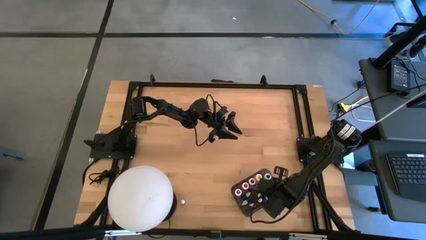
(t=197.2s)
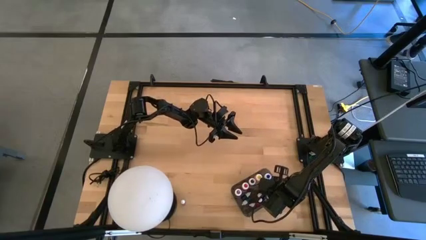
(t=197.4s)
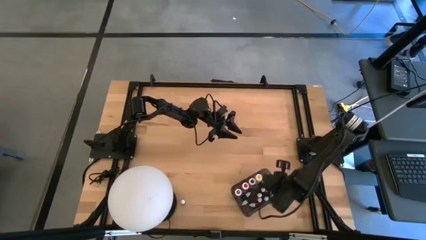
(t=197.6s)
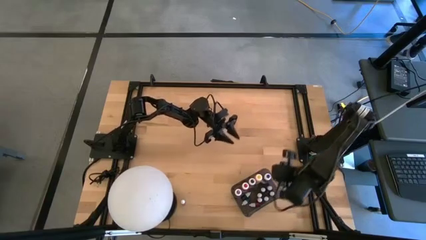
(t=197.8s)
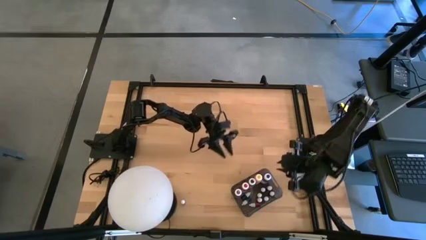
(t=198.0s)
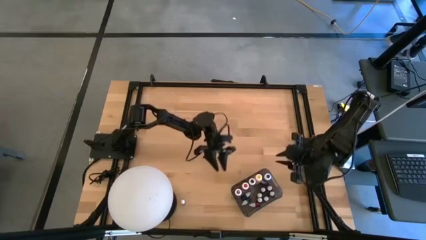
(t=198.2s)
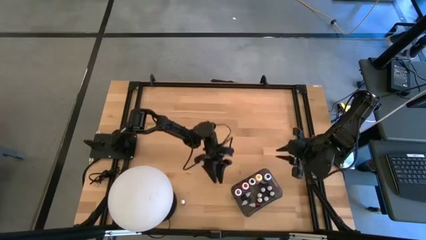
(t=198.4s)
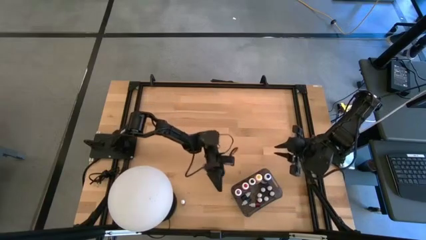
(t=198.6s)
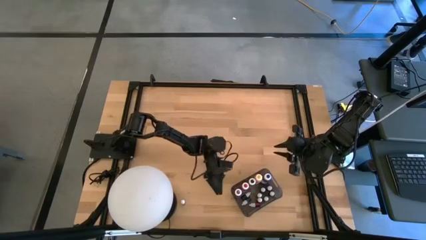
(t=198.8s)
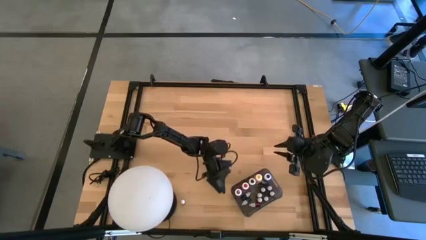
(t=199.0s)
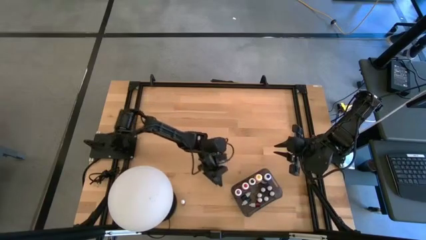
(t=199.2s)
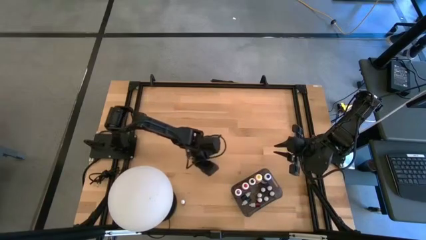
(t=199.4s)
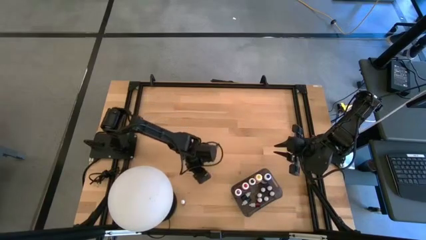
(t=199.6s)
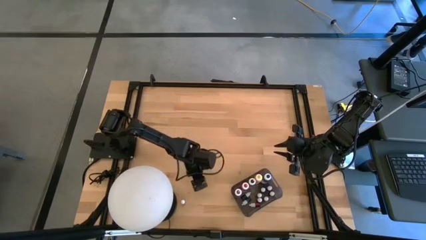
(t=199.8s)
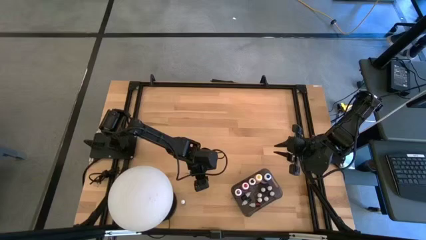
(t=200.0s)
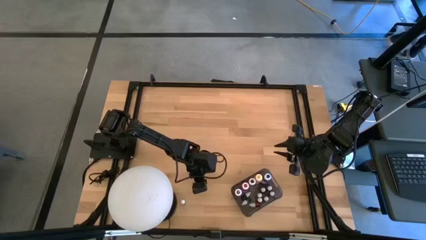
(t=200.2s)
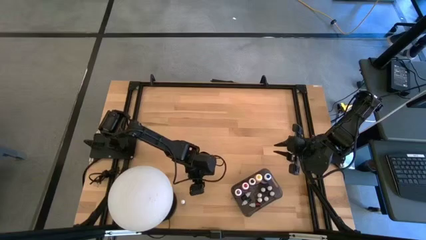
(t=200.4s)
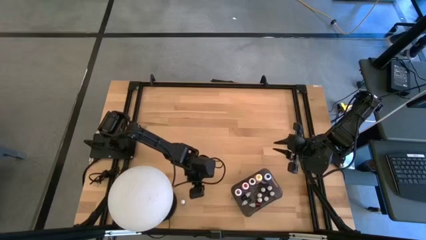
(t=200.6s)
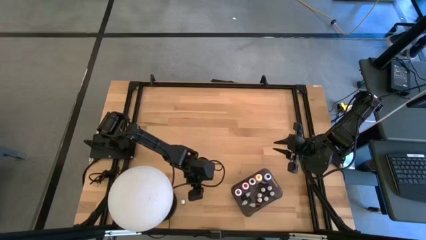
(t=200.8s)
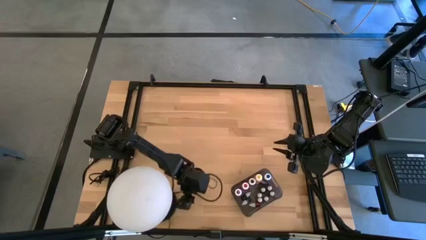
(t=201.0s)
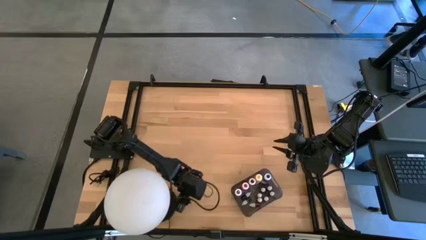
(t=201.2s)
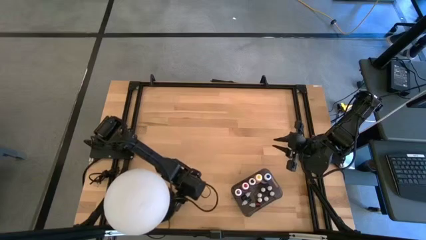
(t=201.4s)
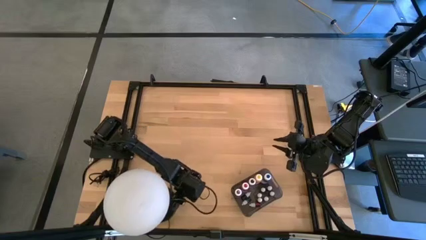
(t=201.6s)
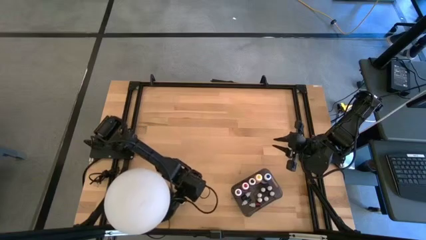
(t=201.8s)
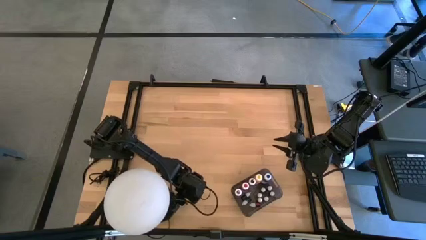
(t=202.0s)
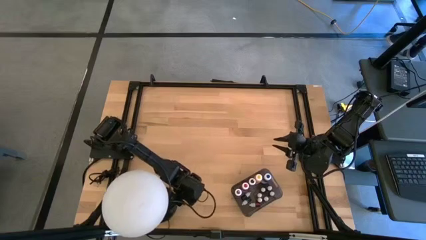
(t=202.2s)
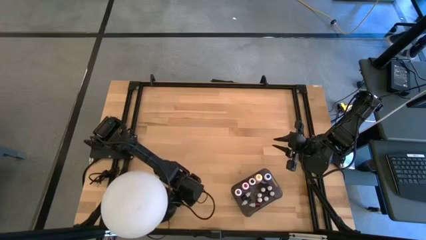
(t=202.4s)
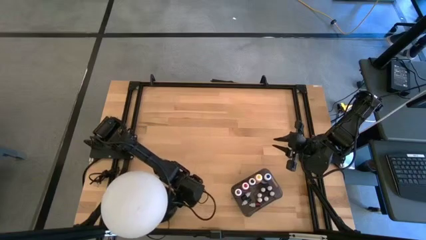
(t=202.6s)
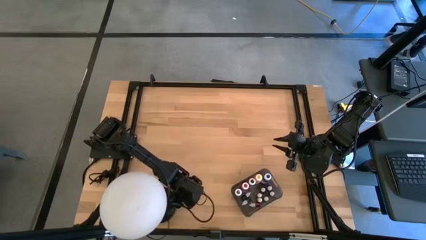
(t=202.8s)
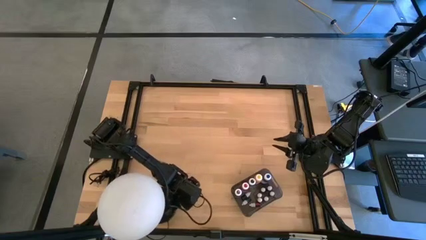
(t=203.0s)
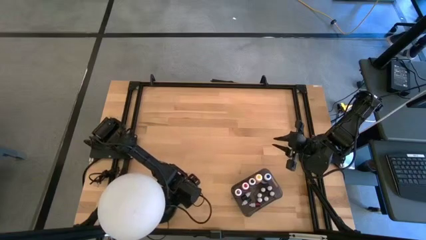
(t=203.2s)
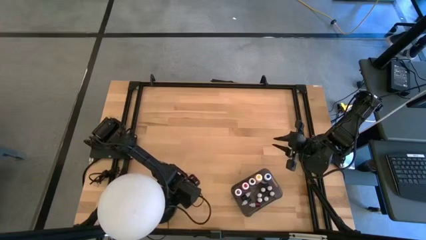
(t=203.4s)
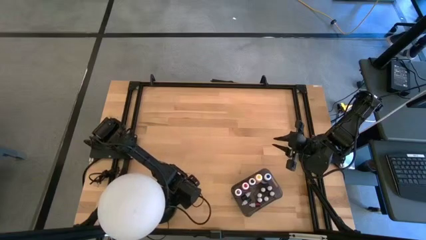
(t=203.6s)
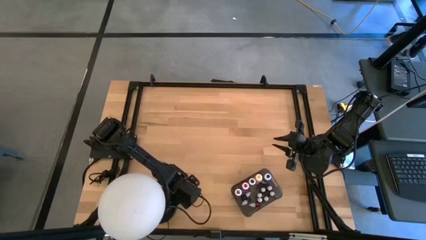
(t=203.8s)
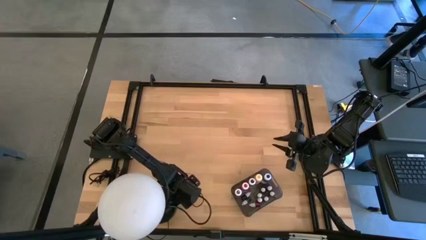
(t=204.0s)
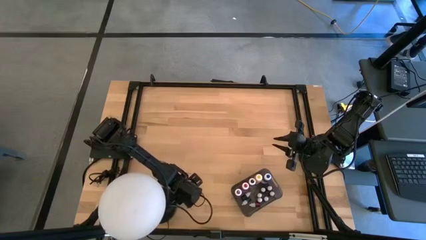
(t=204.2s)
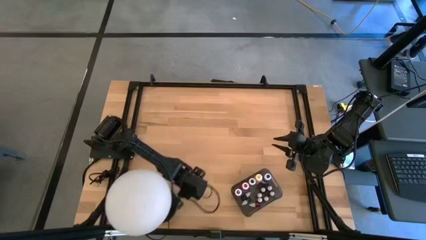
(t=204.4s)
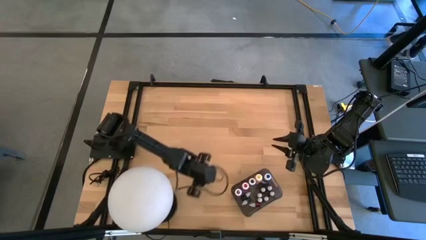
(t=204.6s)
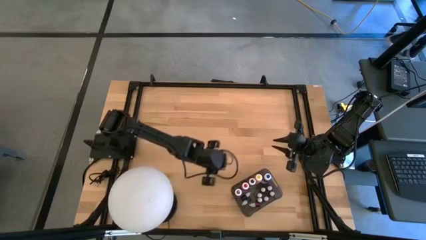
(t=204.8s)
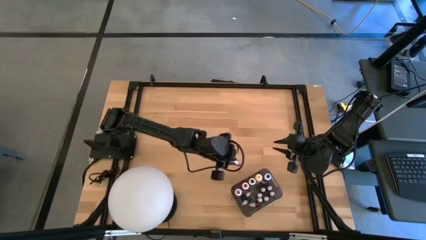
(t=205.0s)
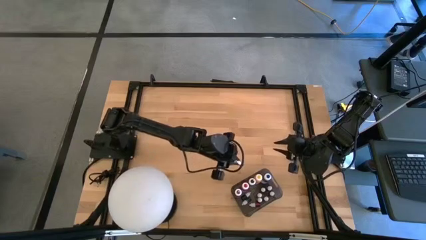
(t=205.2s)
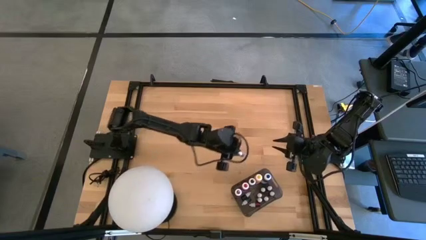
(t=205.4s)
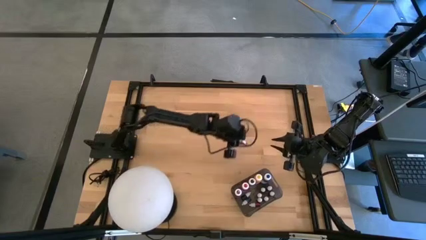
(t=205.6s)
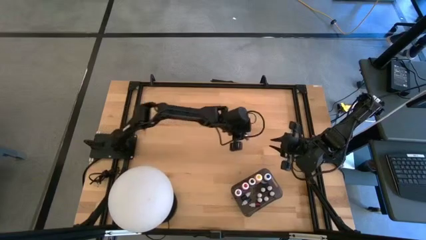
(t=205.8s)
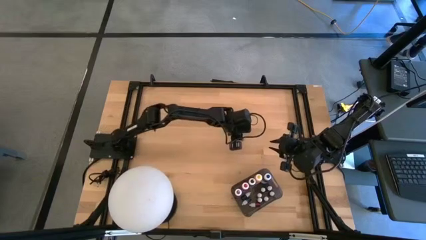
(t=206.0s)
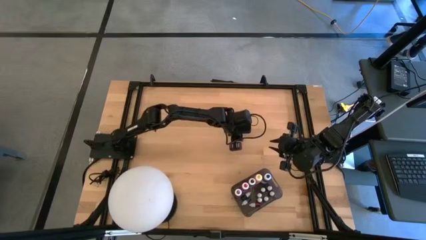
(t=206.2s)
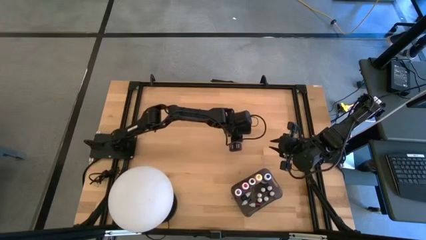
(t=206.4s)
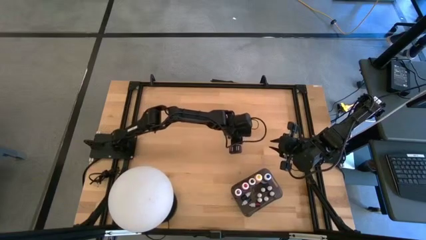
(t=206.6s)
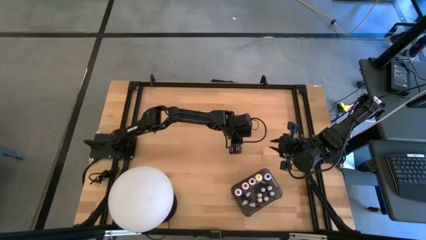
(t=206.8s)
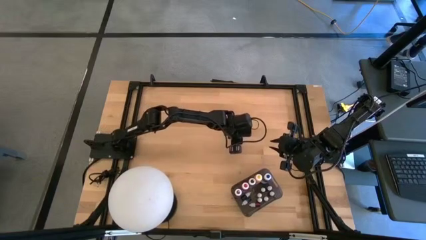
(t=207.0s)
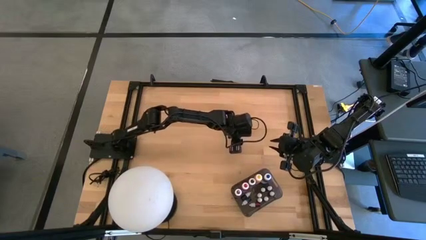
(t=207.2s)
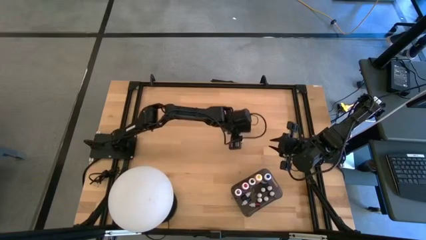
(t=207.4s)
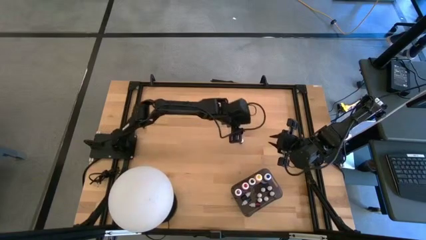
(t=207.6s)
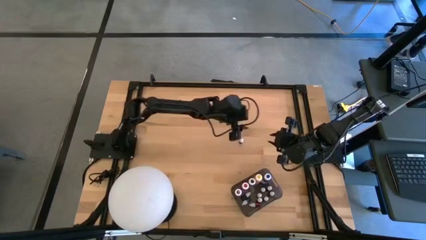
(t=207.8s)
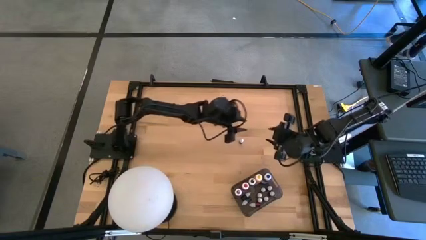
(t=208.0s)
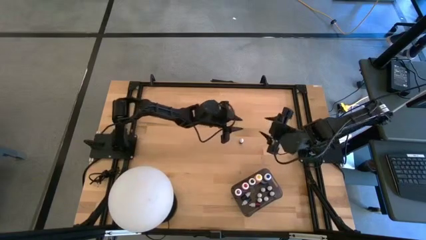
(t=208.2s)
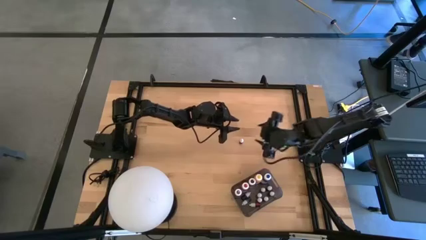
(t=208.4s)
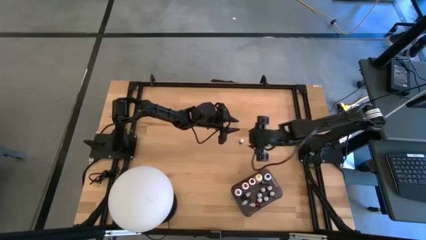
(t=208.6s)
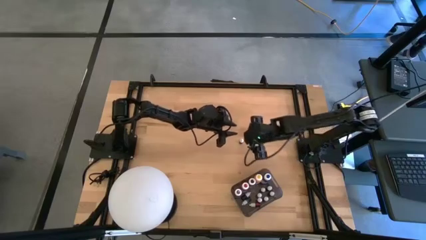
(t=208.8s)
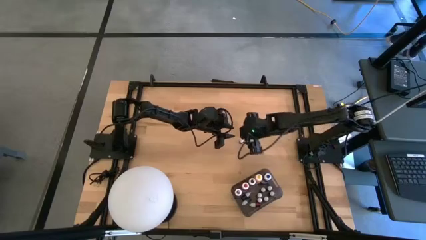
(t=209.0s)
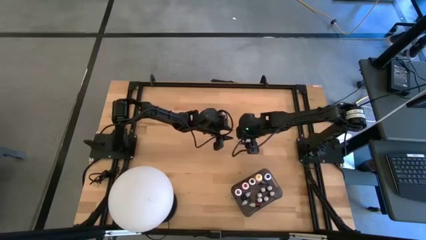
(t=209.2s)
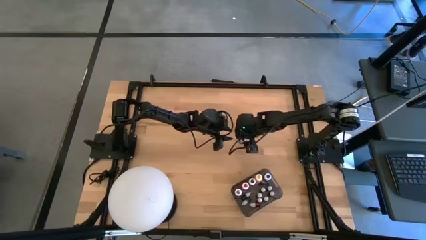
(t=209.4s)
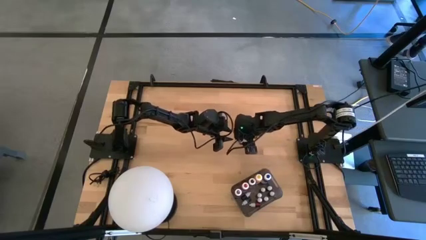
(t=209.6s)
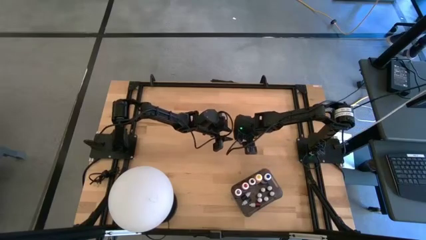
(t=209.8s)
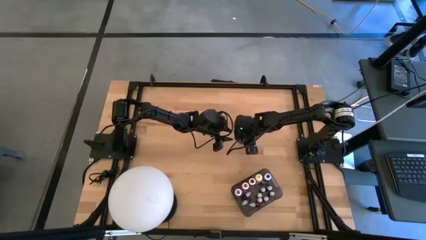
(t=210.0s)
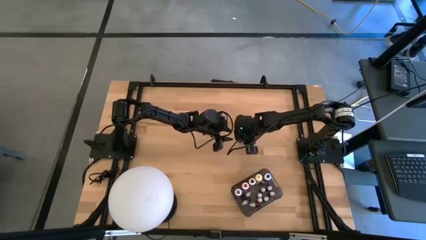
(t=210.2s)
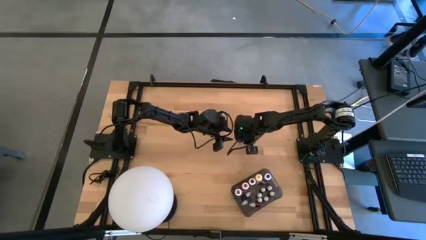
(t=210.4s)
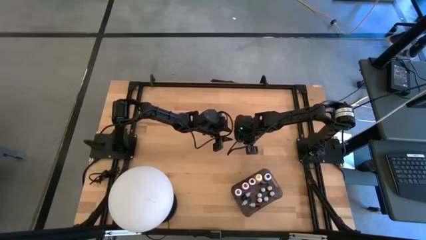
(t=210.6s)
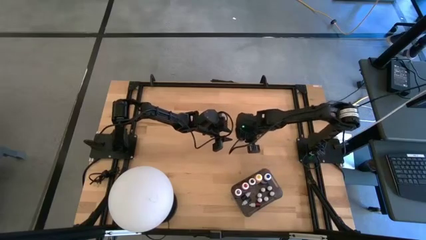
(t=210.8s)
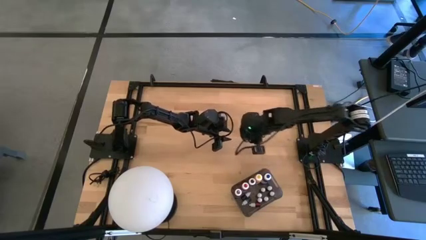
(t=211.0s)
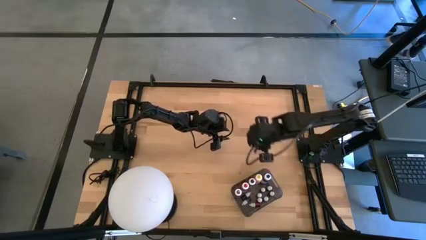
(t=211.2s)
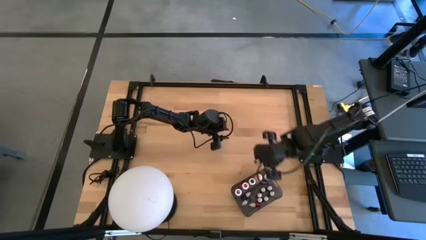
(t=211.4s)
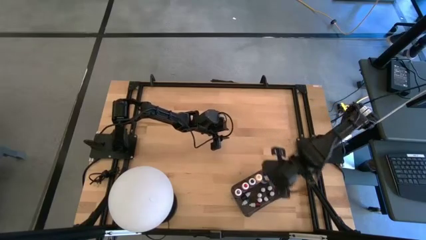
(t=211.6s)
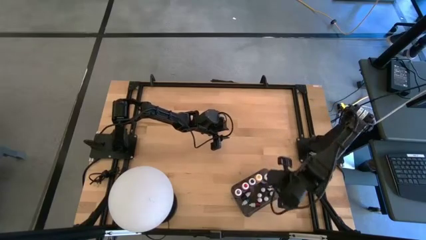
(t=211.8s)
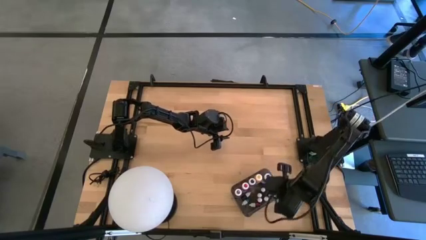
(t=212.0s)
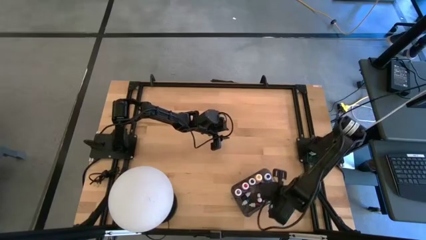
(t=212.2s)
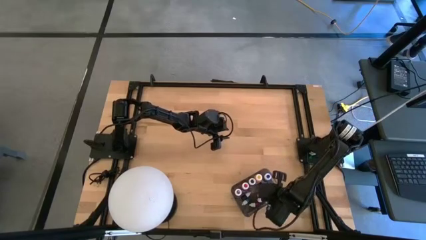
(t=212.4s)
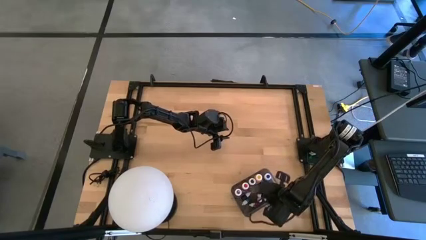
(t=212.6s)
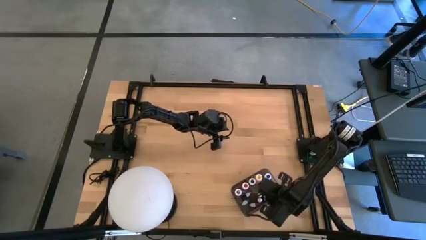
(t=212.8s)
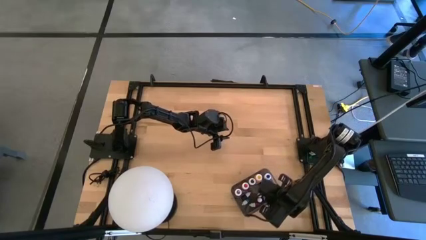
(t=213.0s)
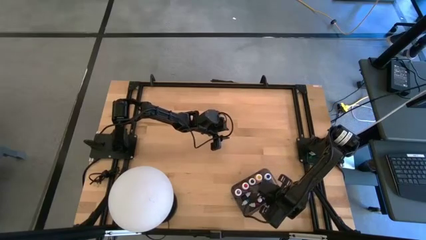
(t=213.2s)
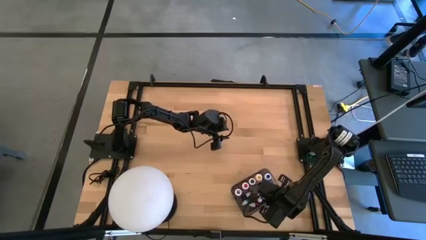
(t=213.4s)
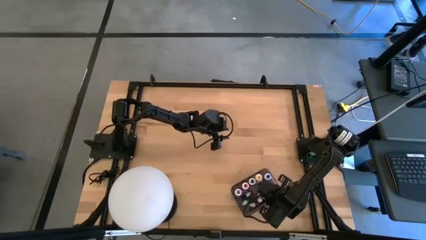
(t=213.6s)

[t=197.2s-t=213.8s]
Task: Pick & Place food coloring
Put the small purple food coloring bottle into the bin
